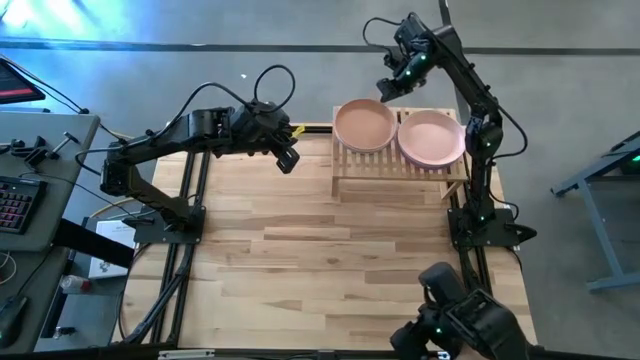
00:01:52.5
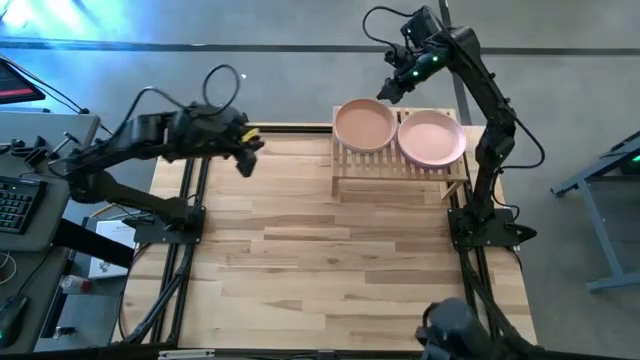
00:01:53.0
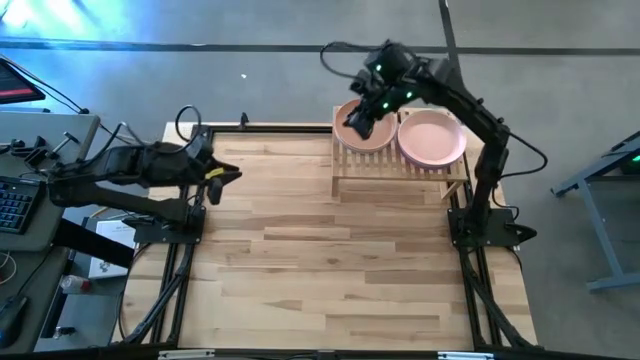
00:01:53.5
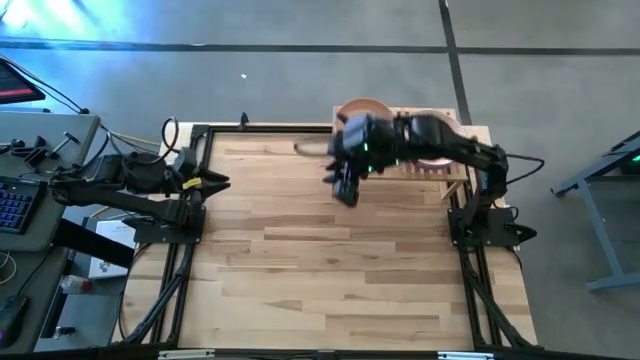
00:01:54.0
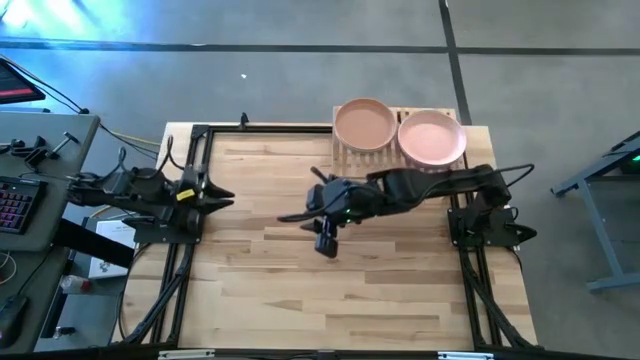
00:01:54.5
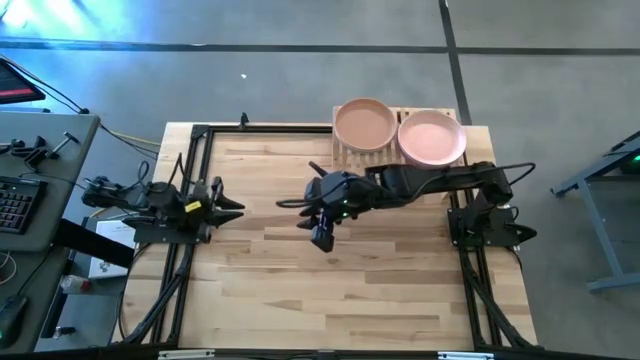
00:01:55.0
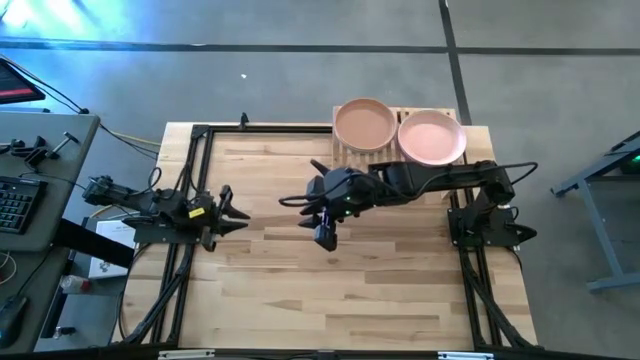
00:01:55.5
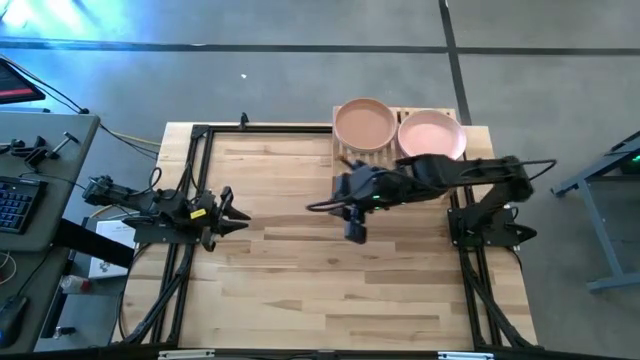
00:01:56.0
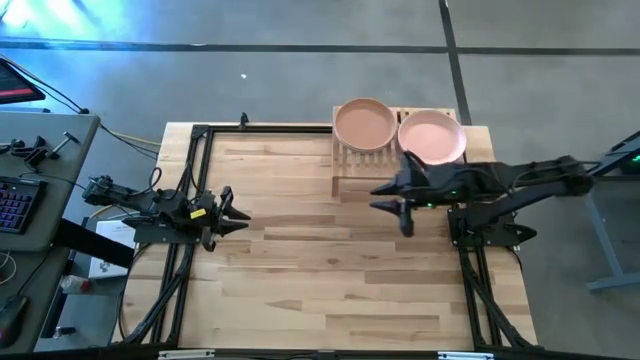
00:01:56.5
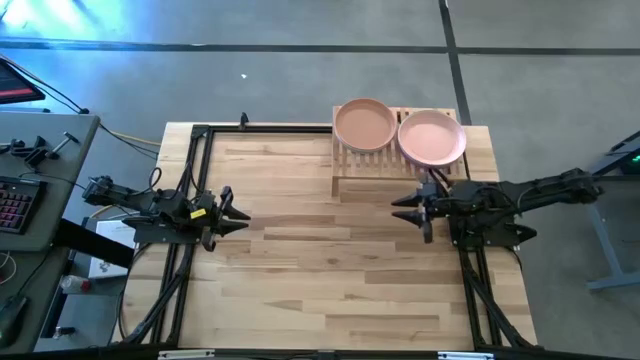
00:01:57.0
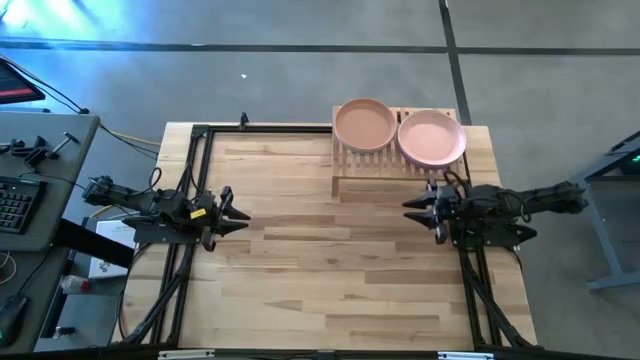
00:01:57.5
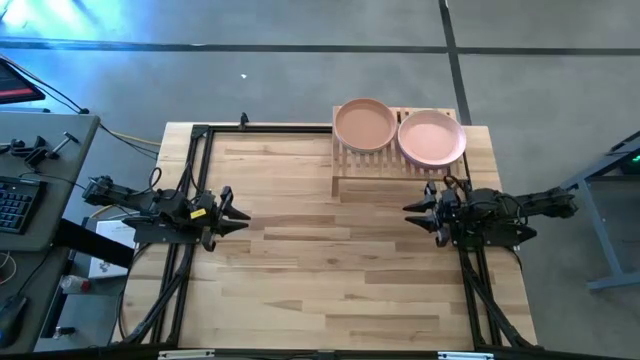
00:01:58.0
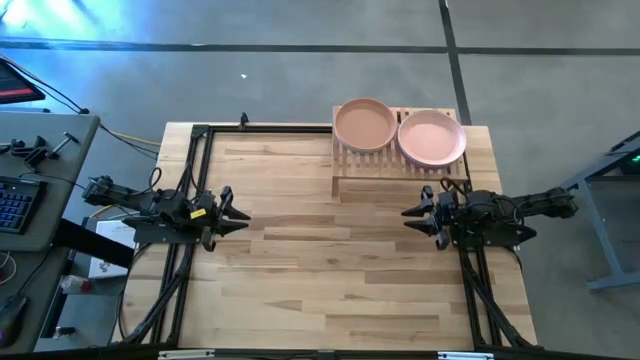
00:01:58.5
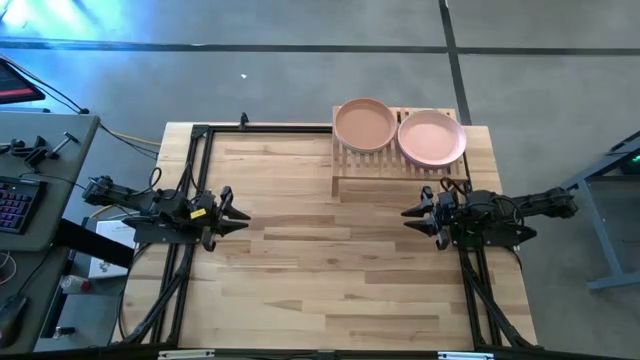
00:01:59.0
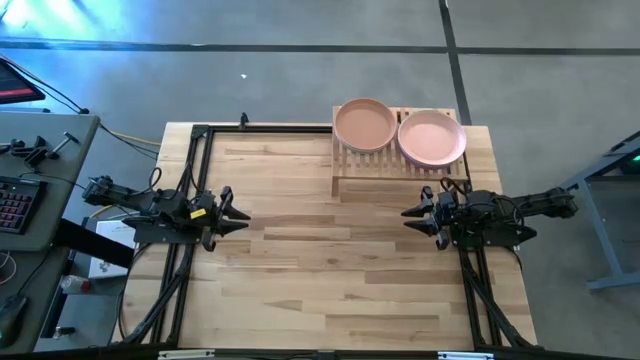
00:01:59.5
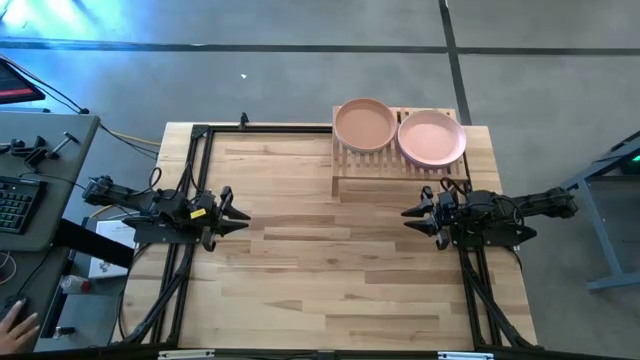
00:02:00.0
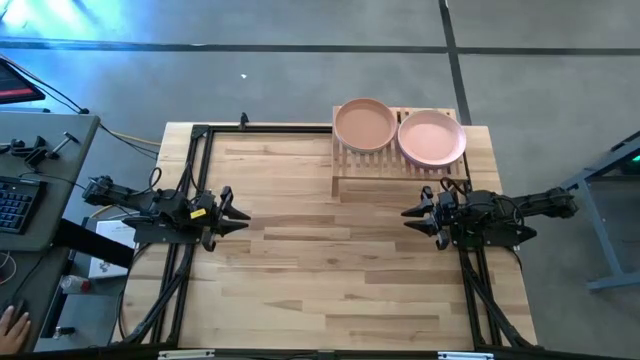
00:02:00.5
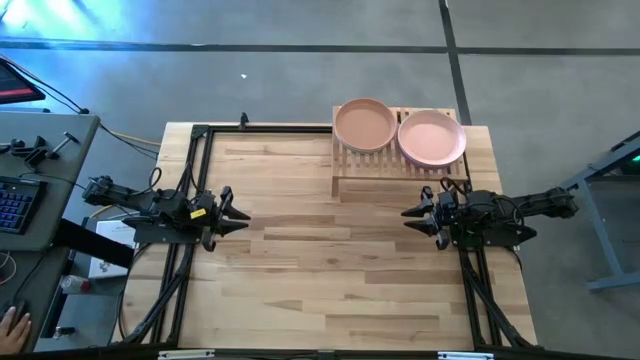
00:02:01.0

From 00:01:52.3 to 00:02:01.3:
Task: Place and stack plates onto a shelf
Return to Home Position

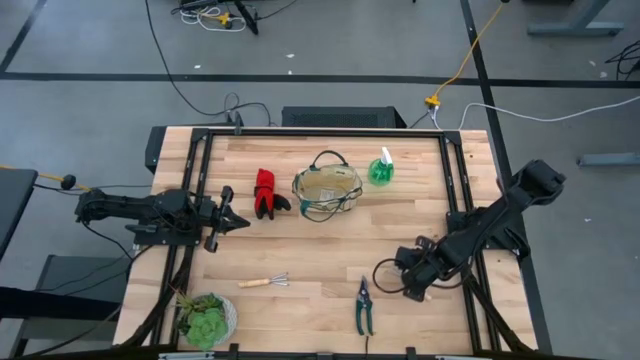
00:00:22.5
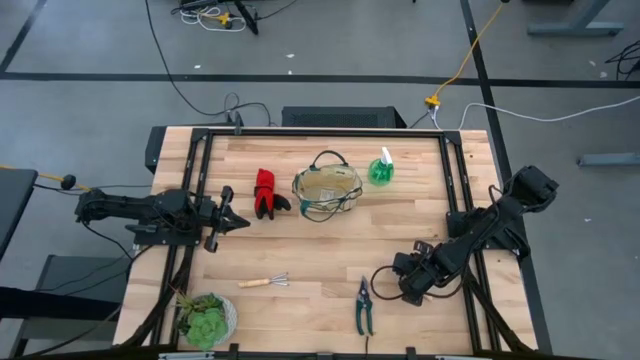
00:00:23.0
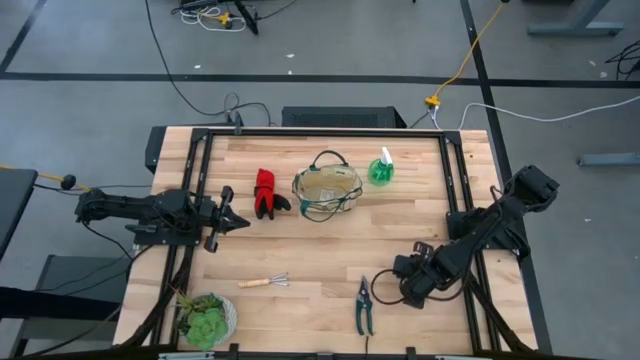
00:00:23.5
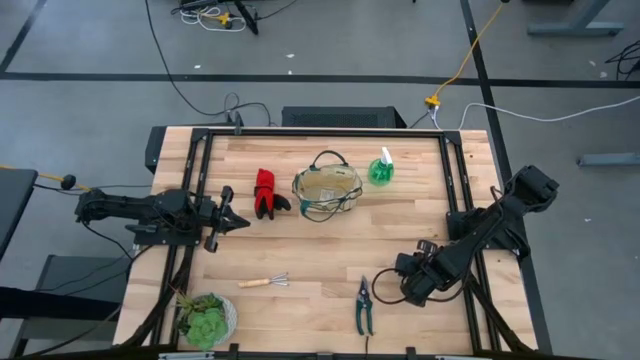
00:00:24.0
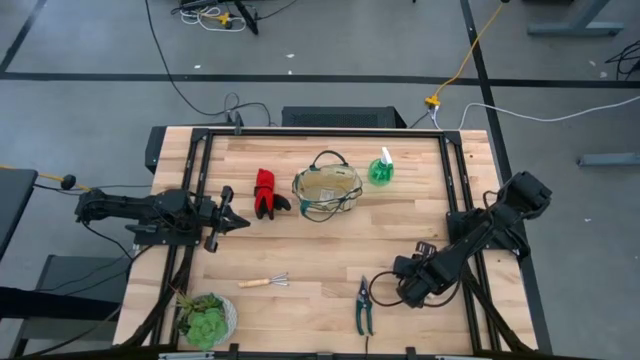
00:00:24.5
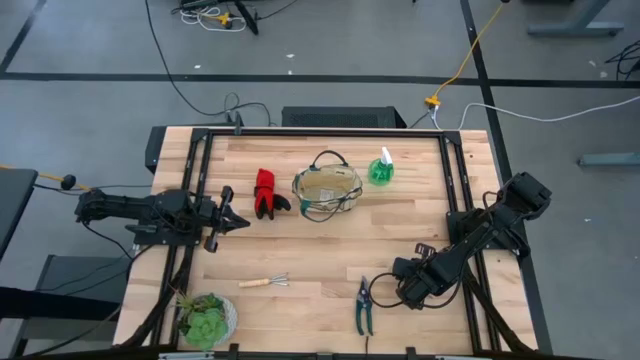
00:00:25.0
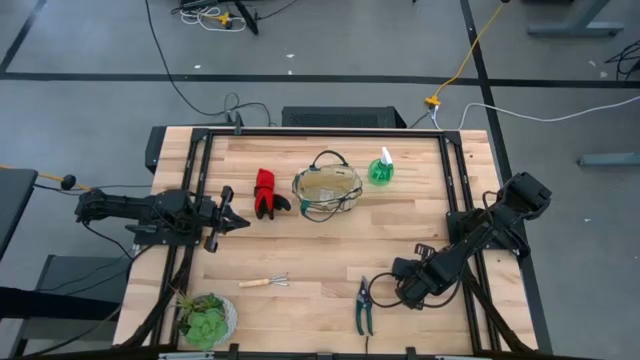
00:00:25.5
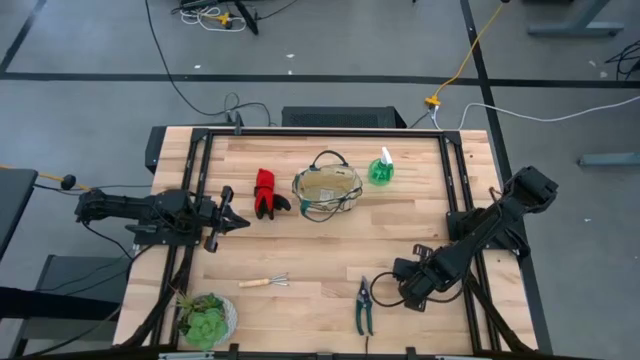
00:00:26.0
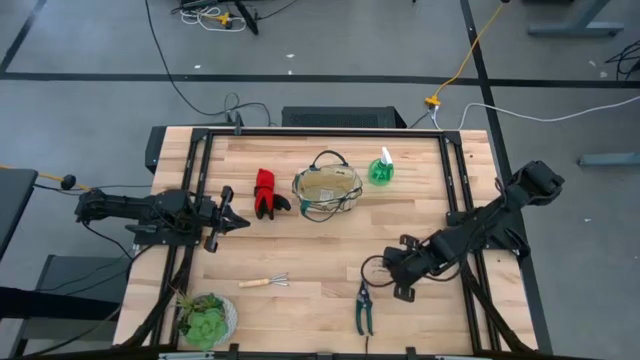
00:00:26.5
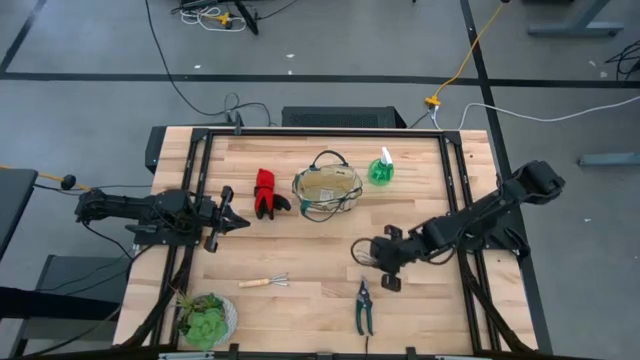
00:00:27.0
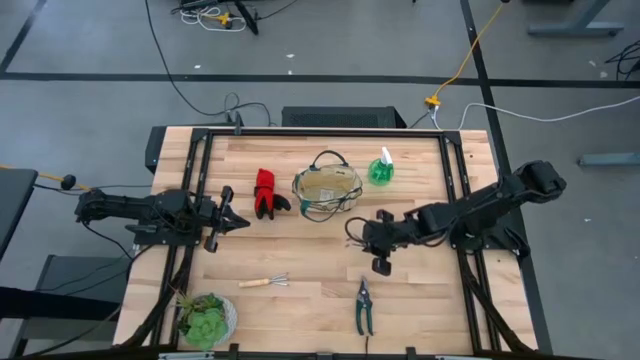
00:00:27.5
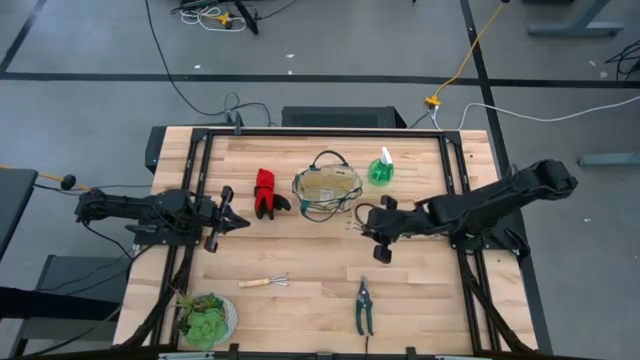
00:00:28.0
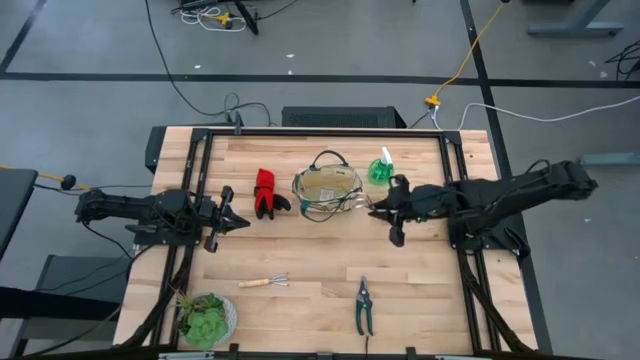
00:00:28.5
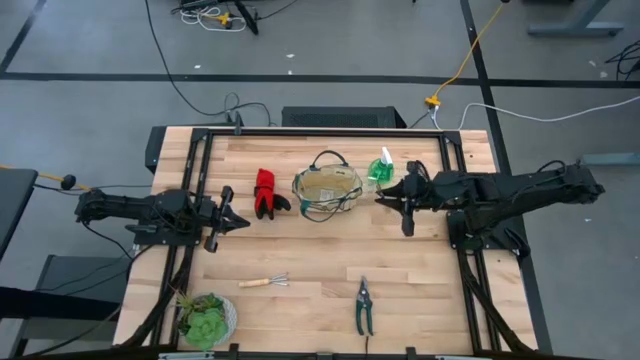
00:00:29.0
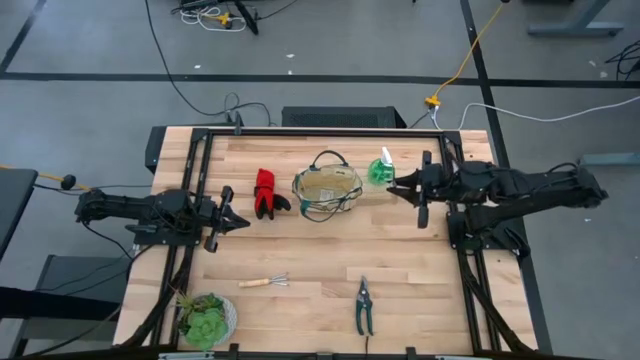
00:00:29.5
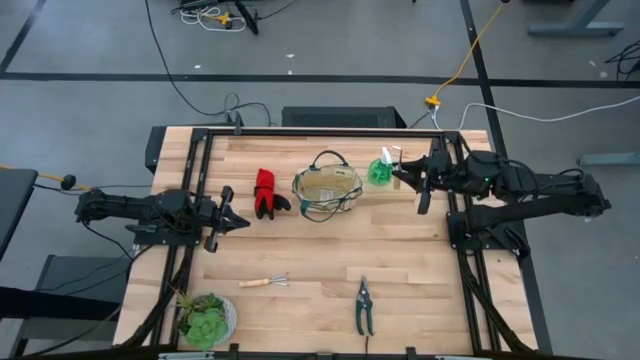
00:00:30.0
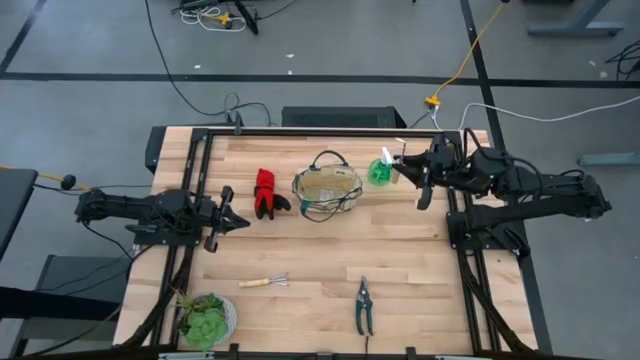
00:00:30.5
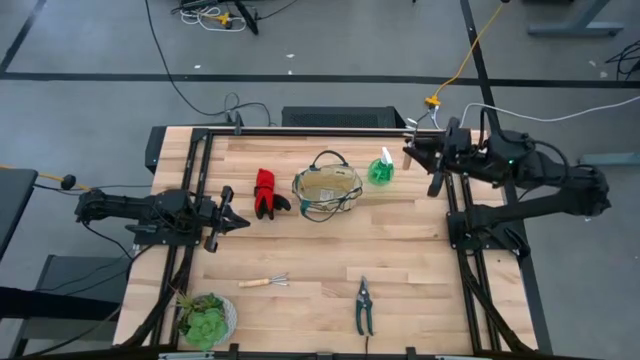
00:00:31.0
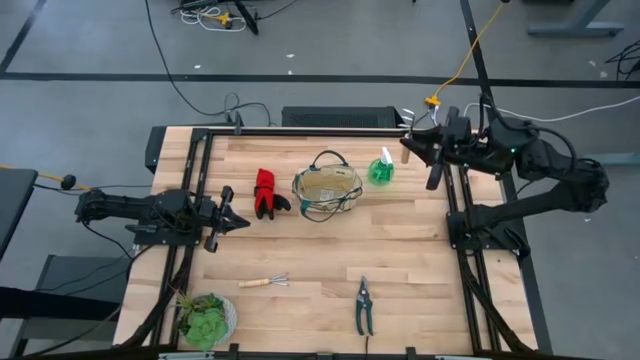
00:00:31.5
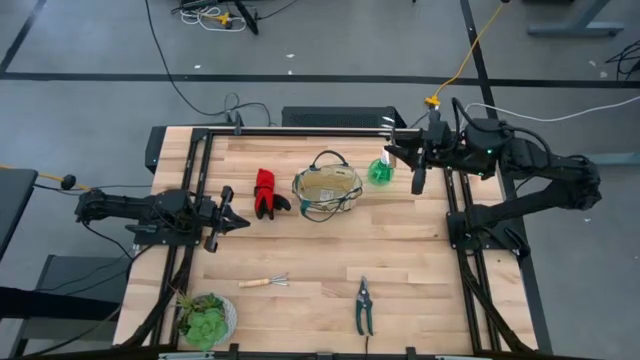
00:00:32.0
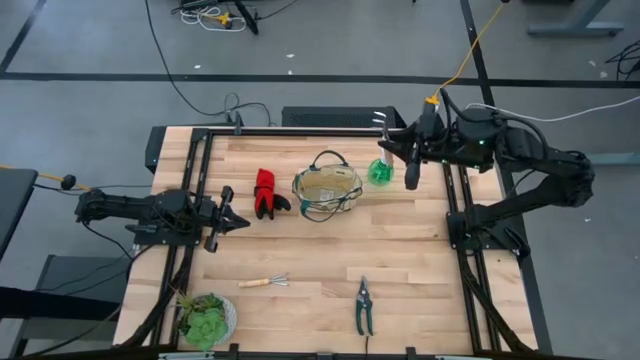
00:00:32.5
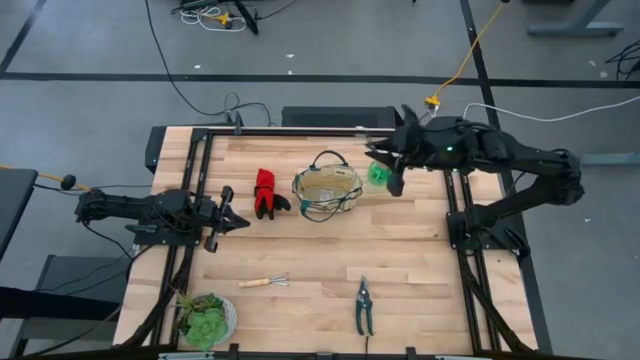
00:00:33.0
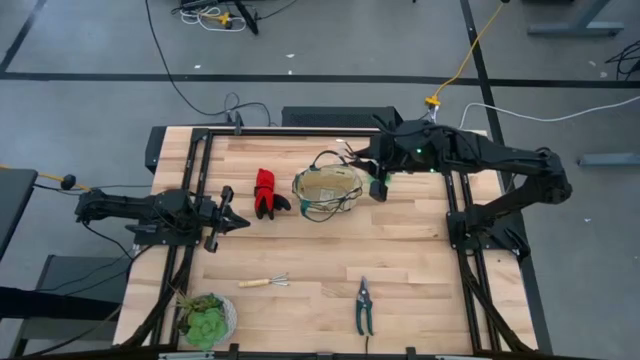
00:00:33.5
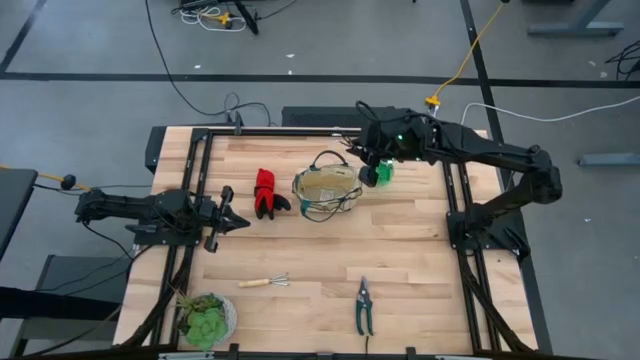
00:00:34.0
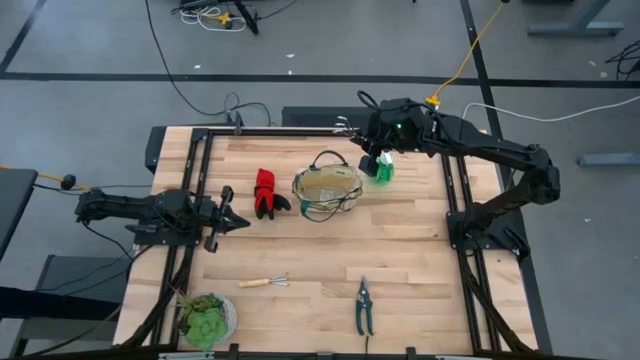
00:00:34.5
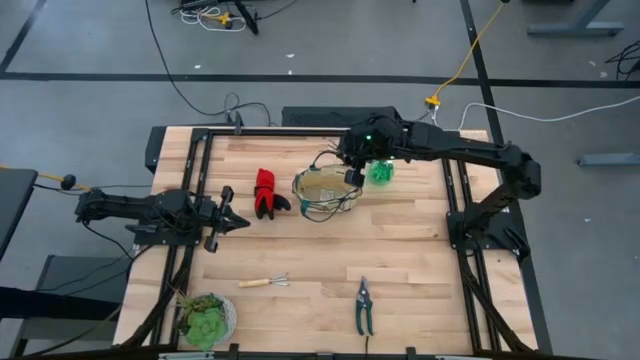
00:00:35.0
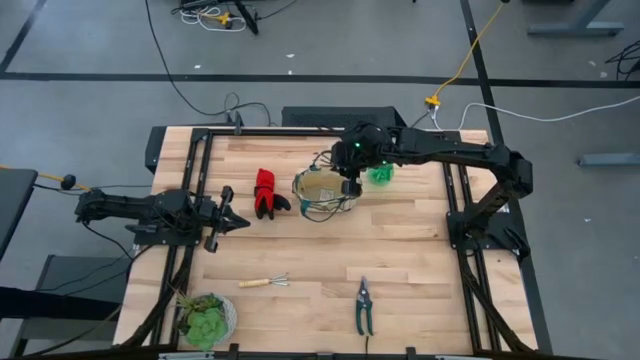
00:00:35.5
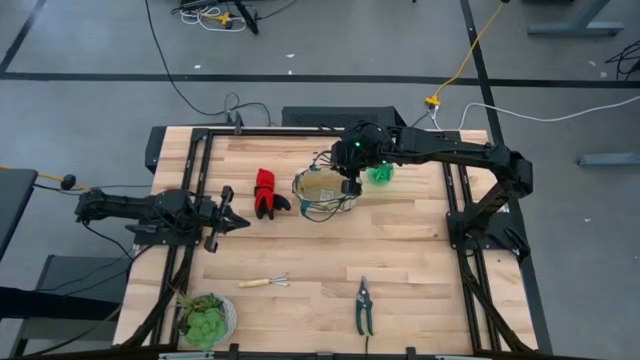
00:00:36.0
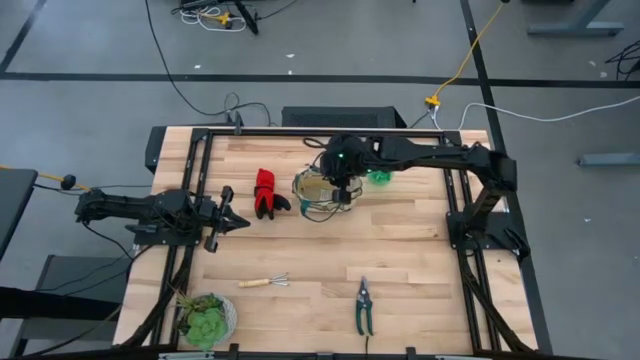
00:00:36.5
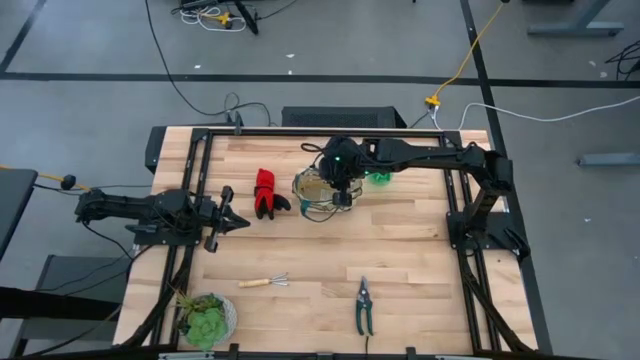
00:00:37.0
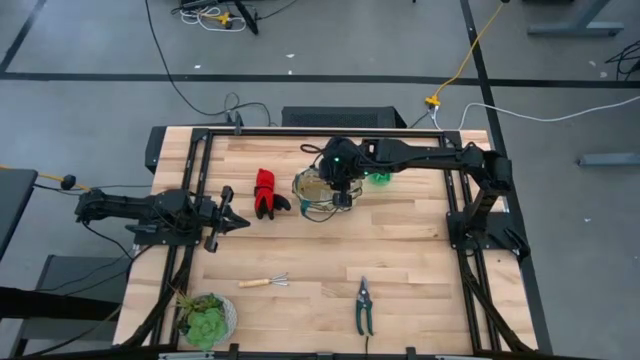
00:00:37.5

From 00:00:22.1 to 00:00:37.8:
Task: Pick & Place Garden tools in Gardening bag
Put the right brown hand rake into the gardening bag
